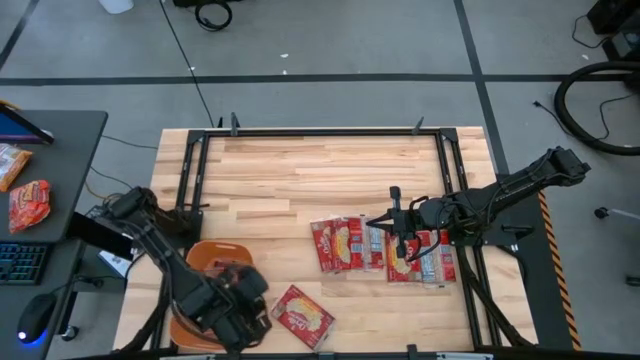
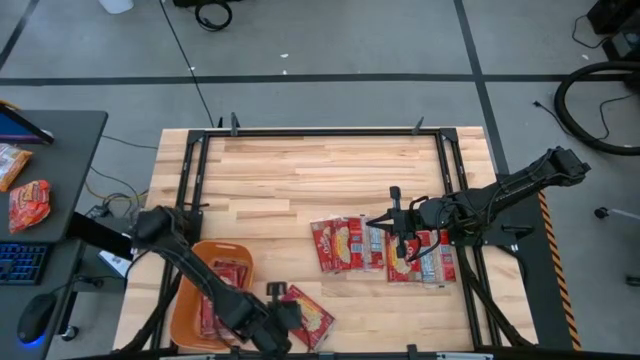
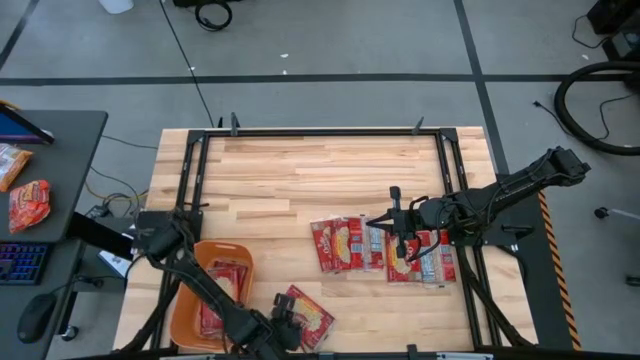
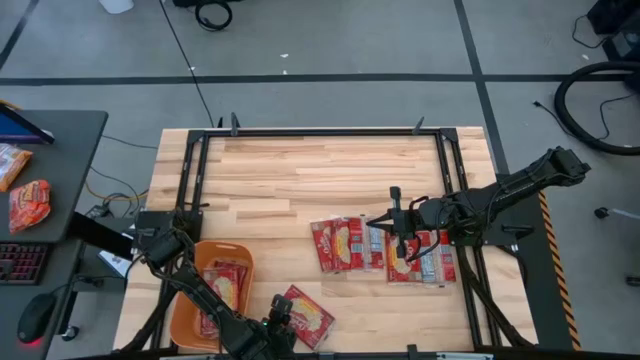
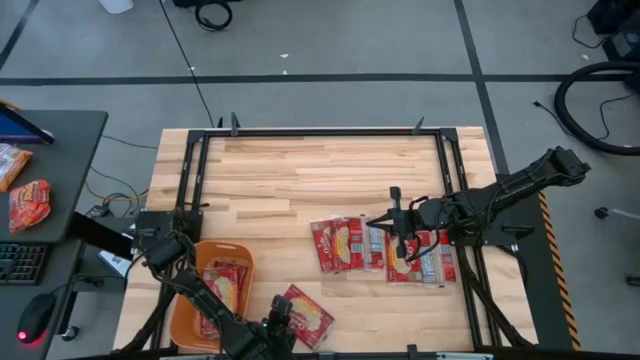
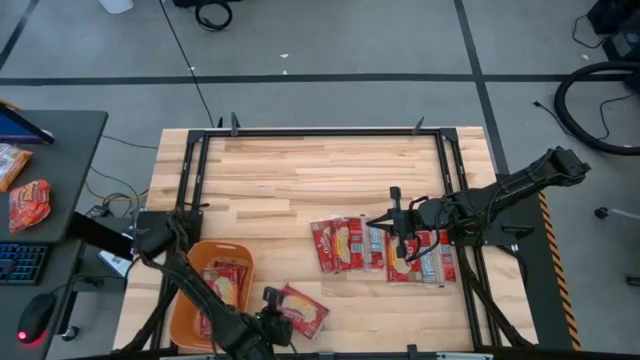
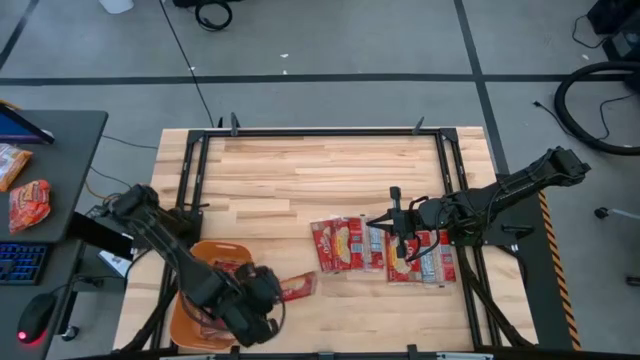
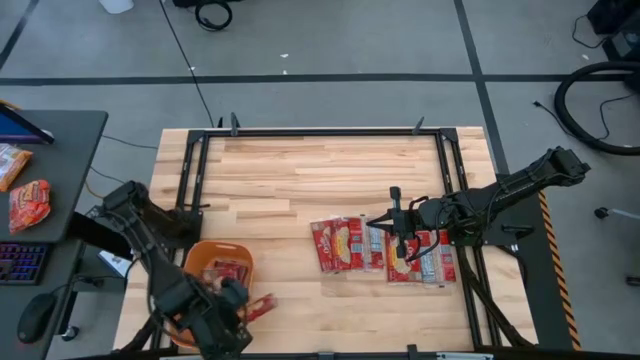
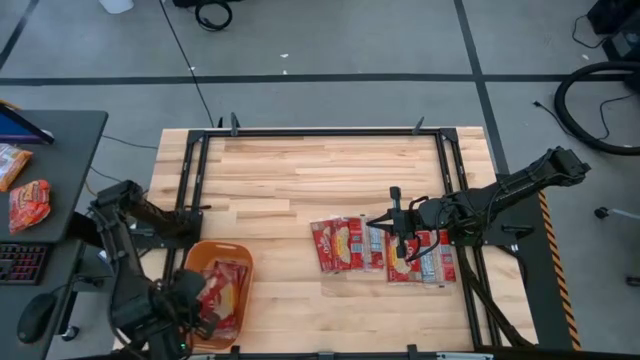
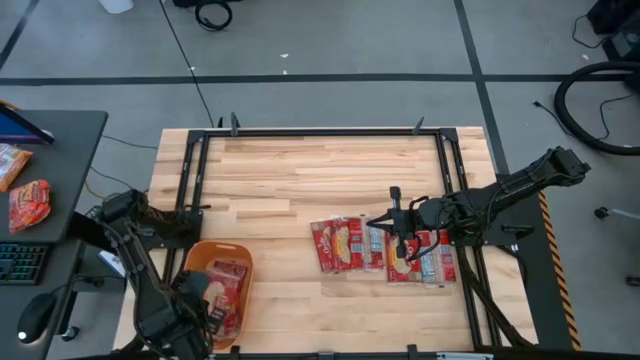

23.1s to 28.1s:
Task: Sort popcorn bags into baskets
Put the popcorn bag into the orange bin

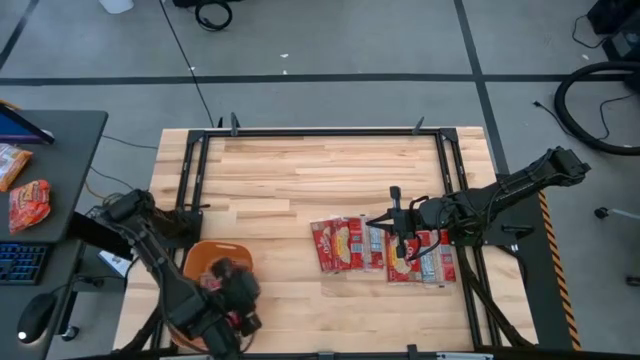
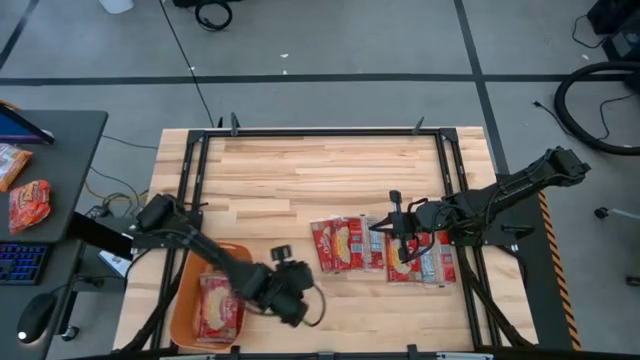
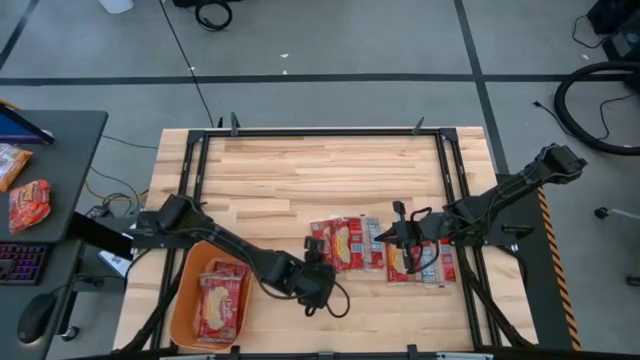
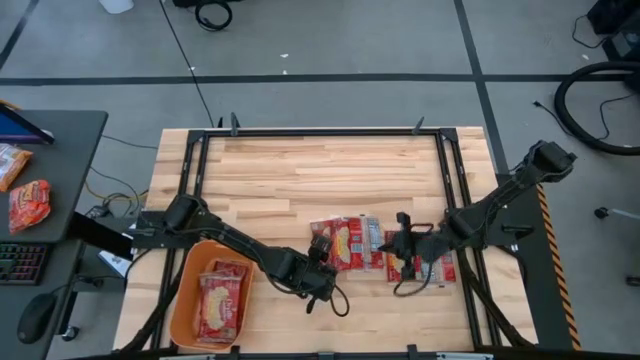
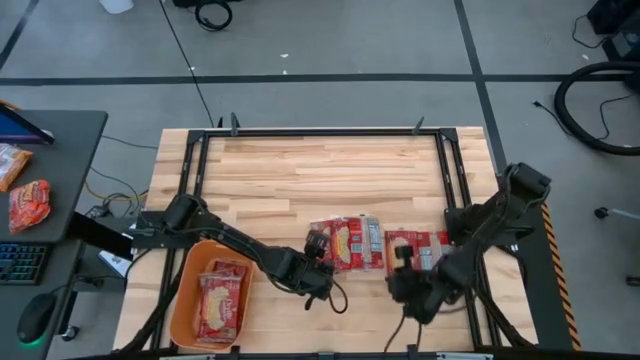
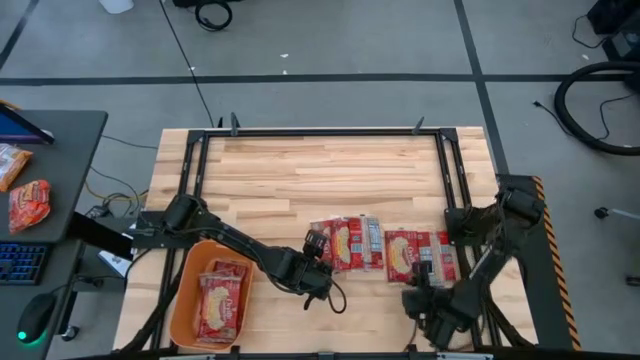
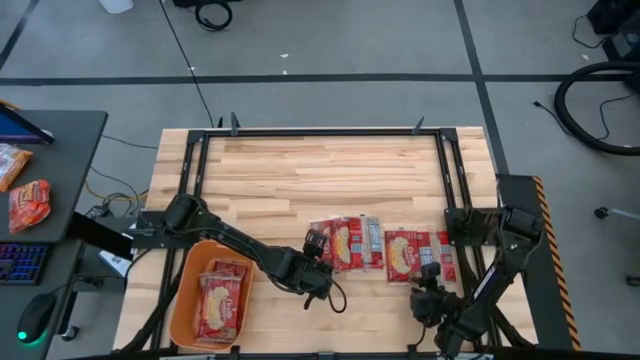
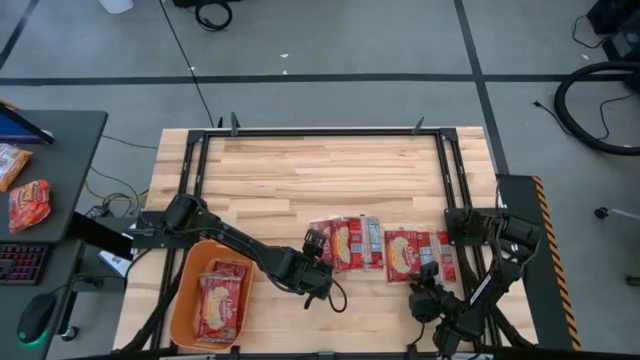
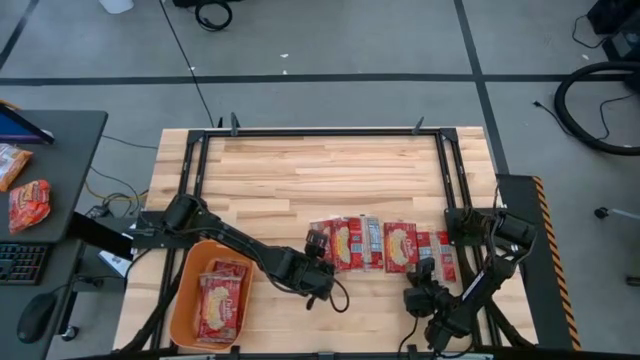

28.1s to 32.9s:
Put the popcorn bag into the orange bin

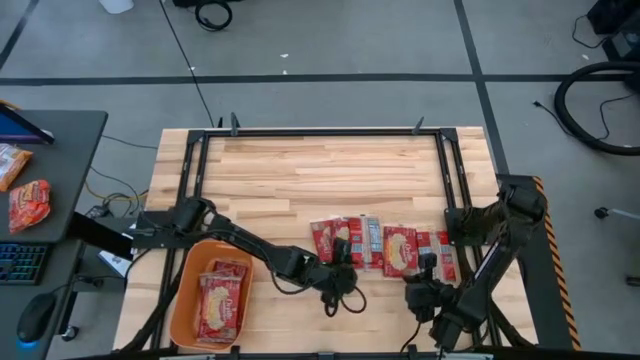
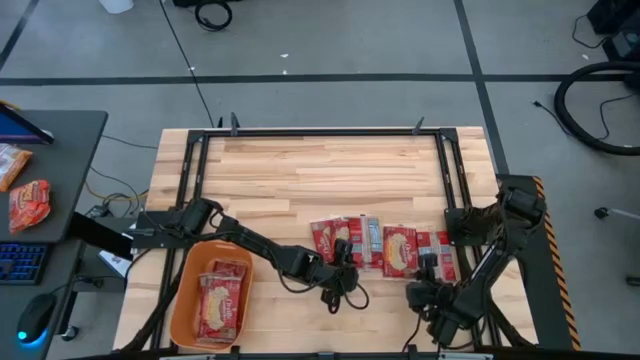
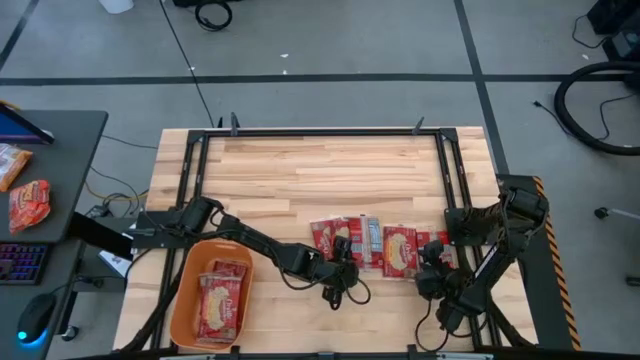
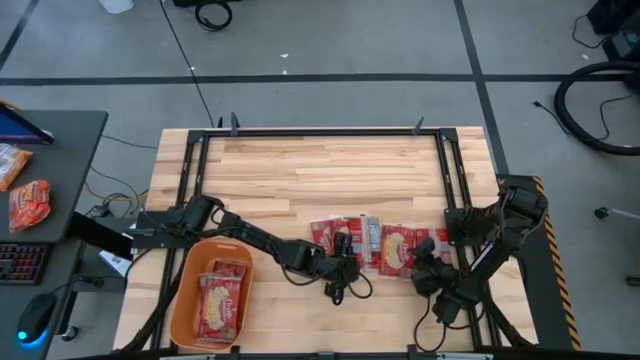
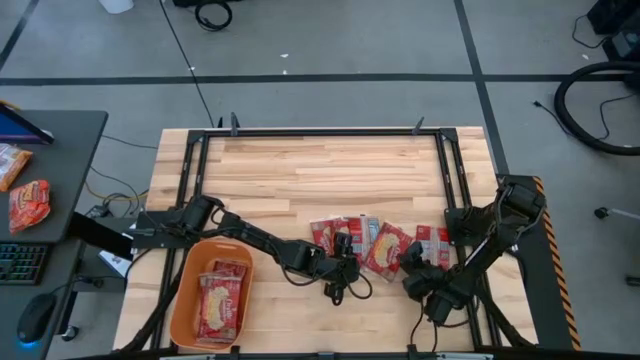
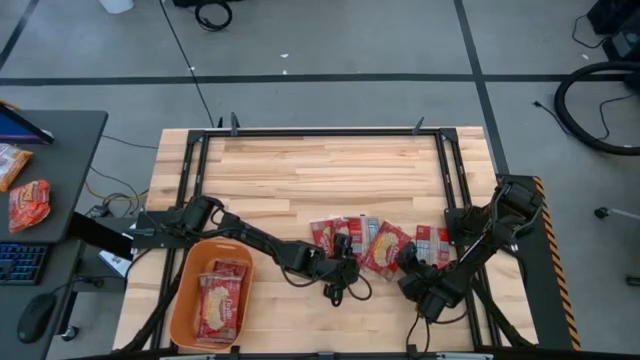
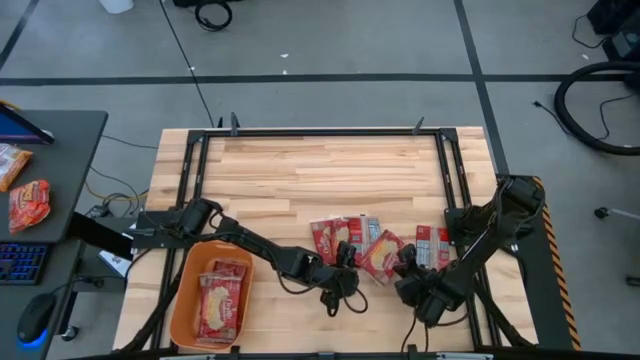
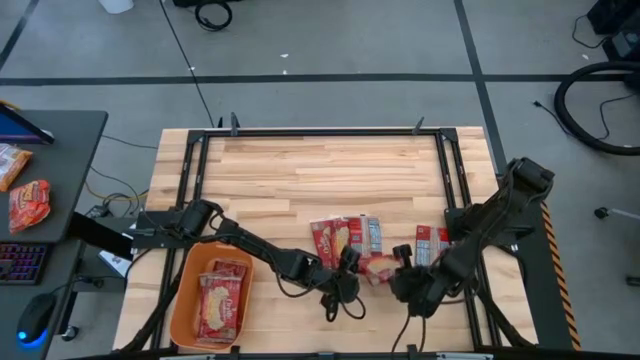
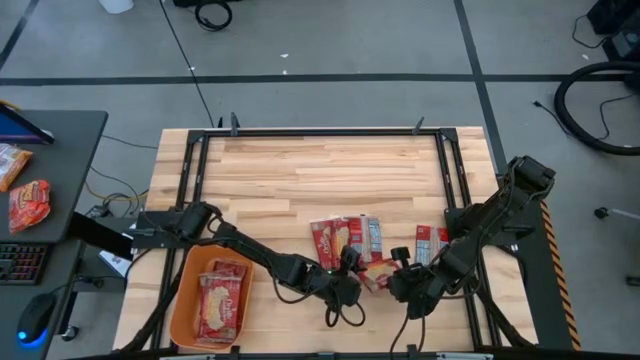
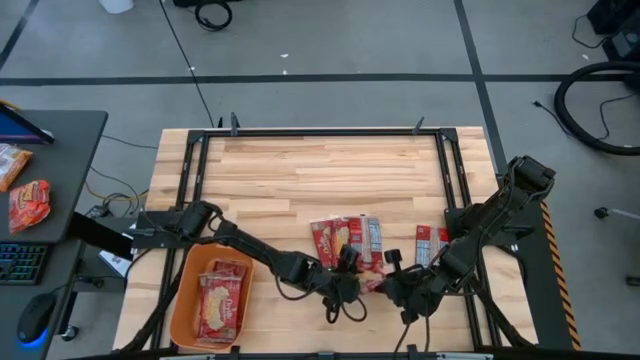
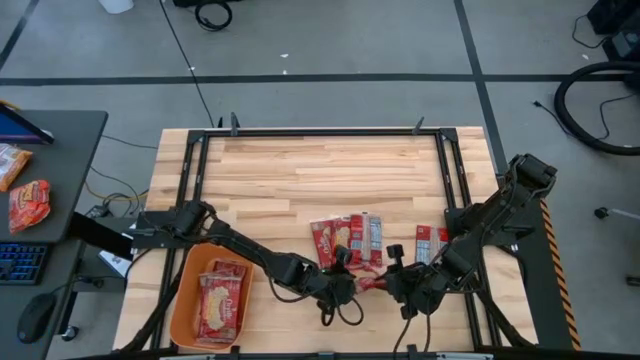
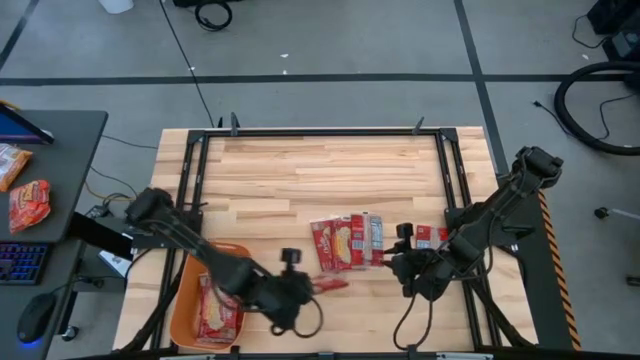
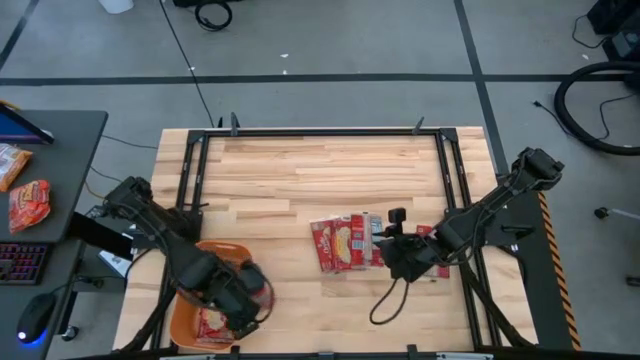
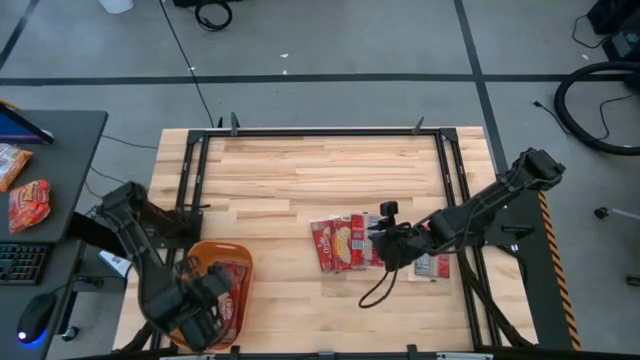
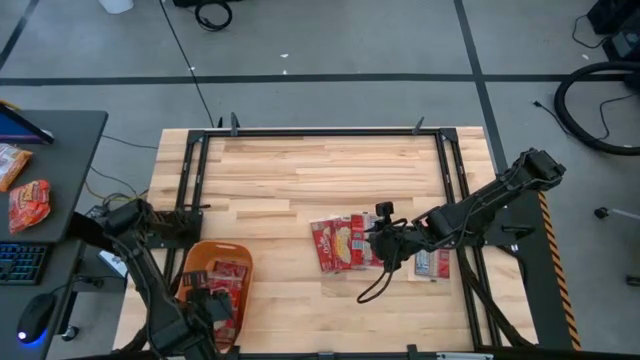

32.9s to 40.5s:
Put the popcorn bag into the orange bin

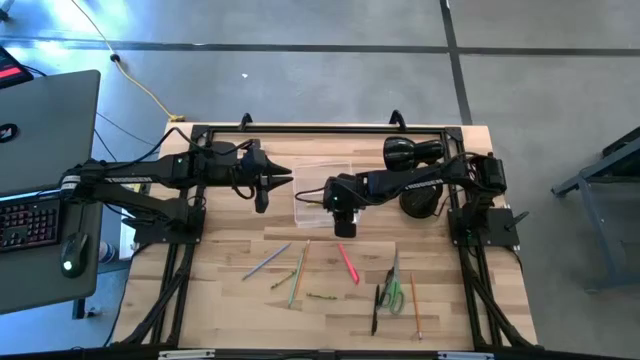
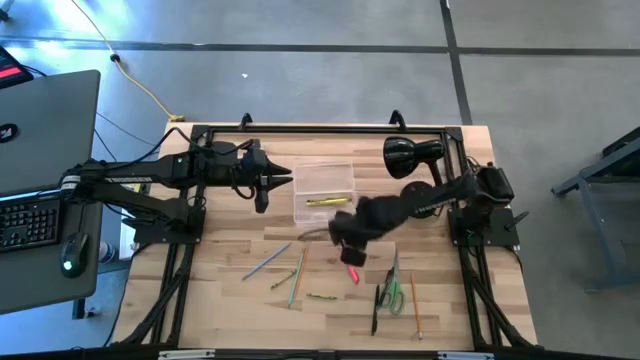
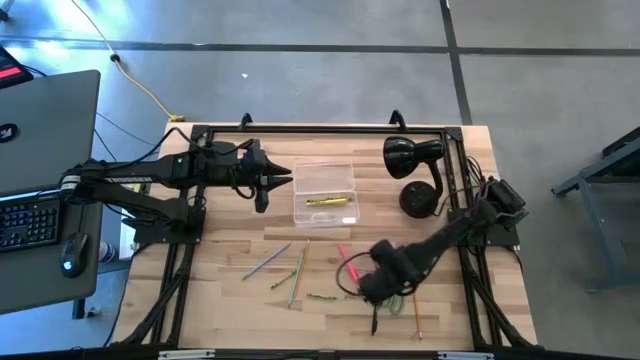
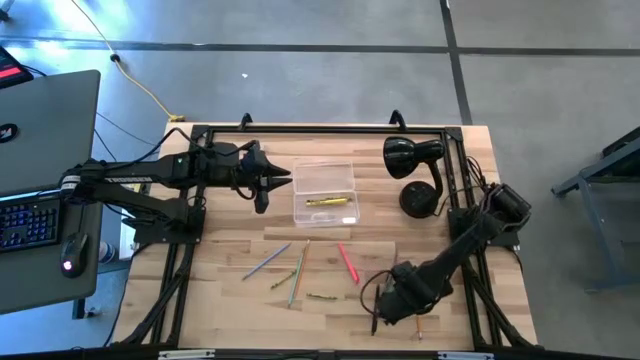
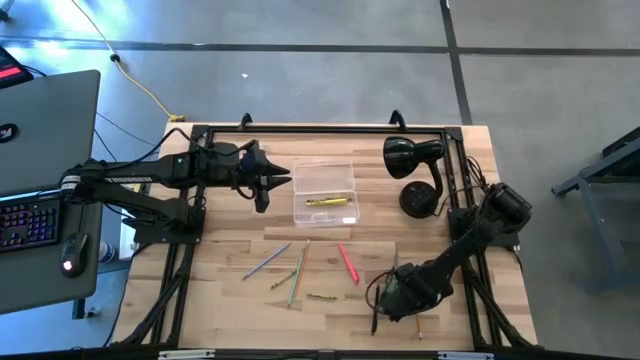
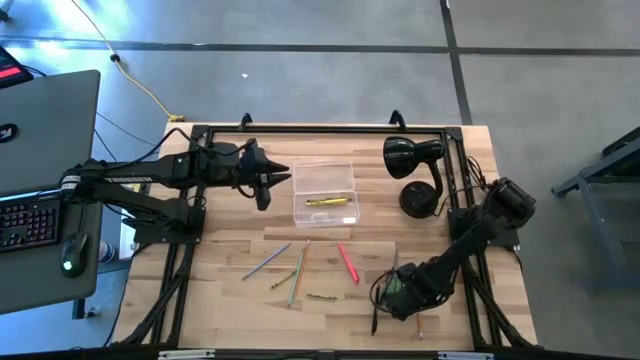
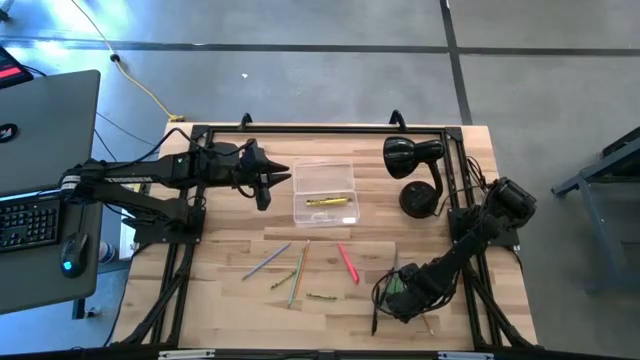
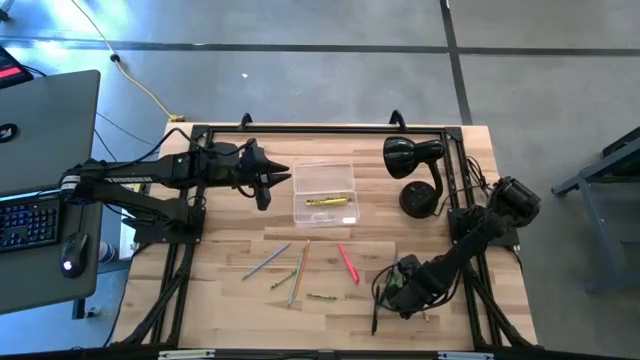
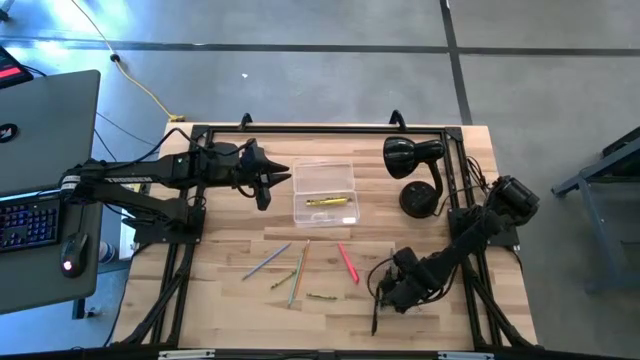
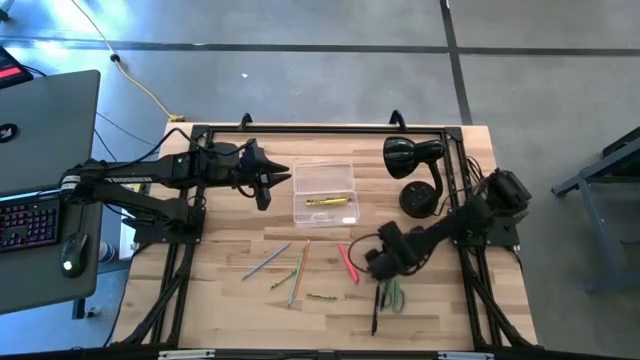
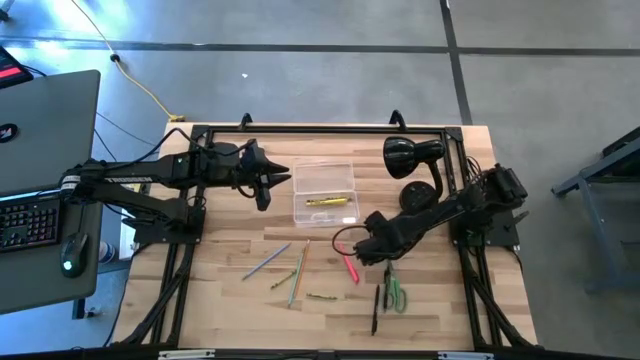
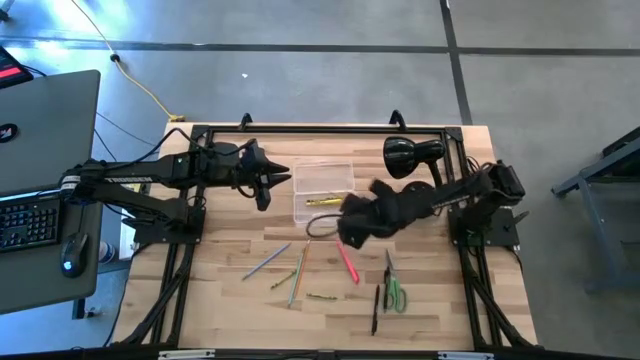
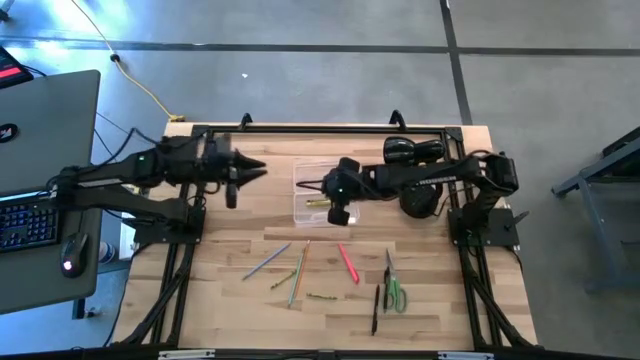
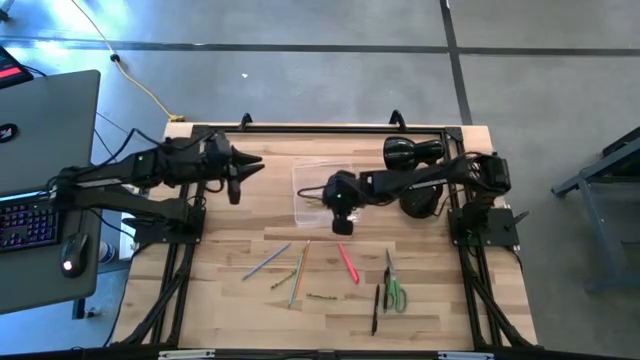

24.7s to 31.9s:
Task: Pick & place school supplies into a supply box
Put the right orange pencil into the transparent supply box
